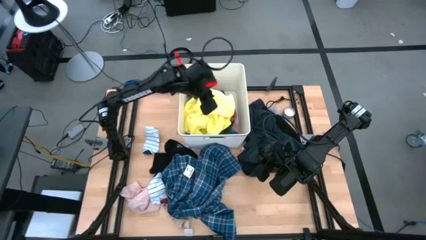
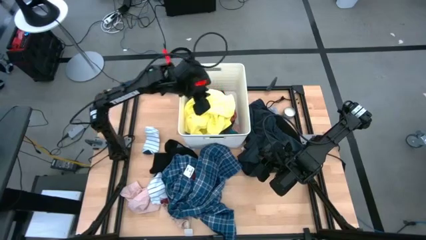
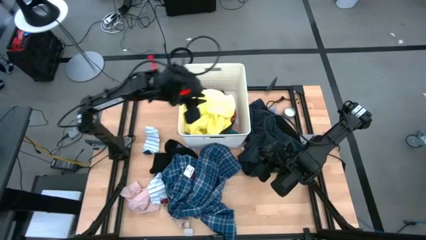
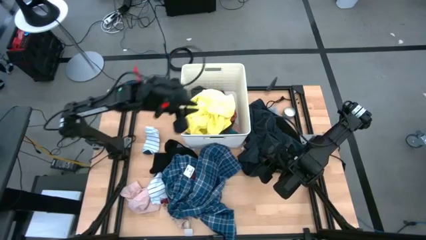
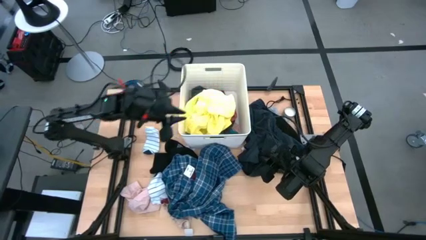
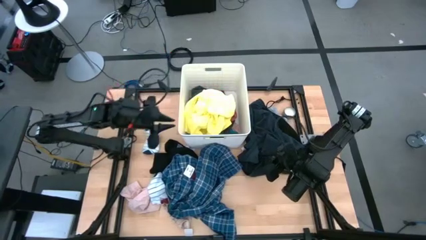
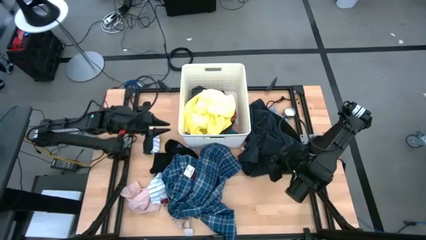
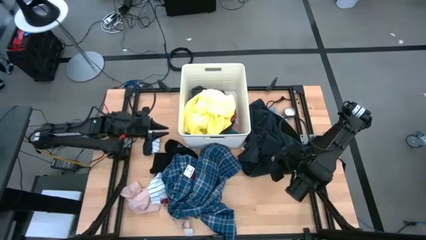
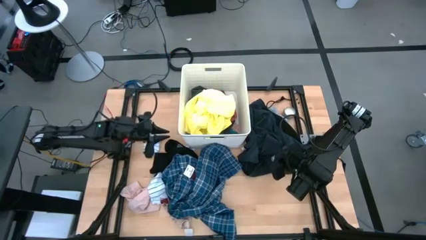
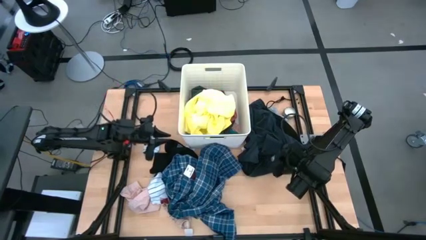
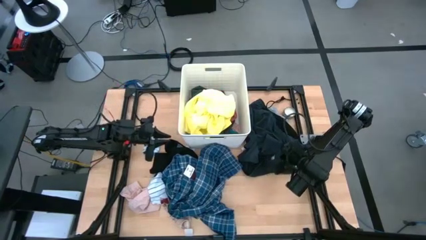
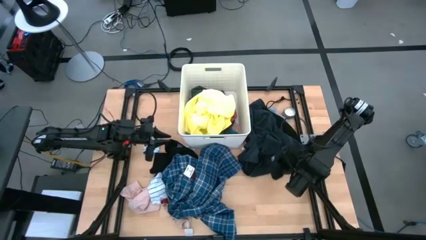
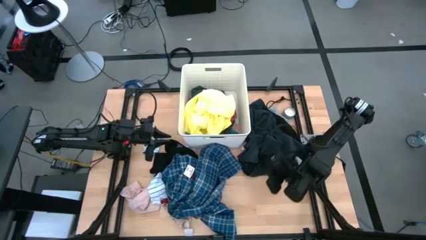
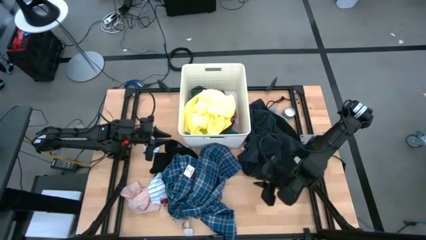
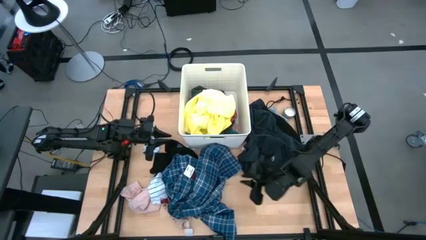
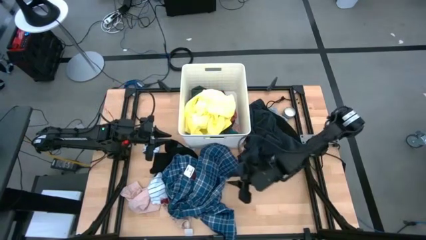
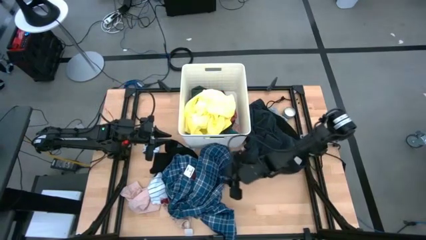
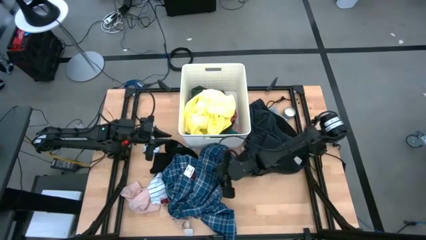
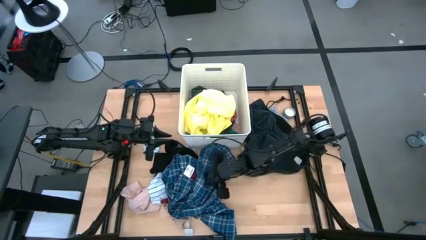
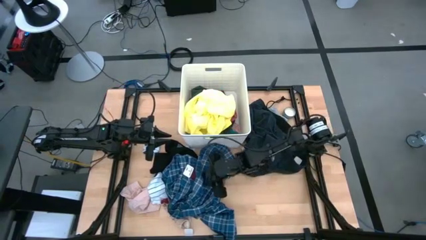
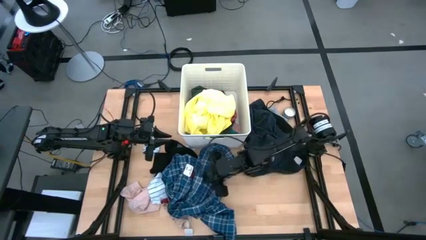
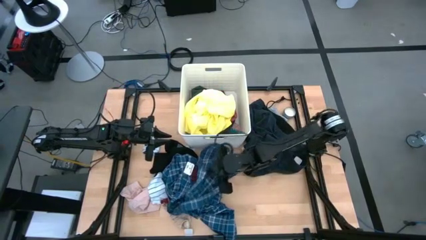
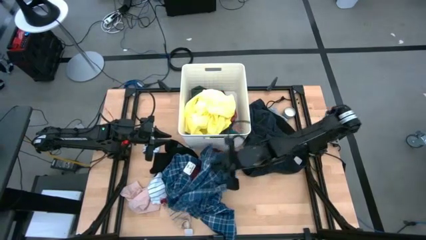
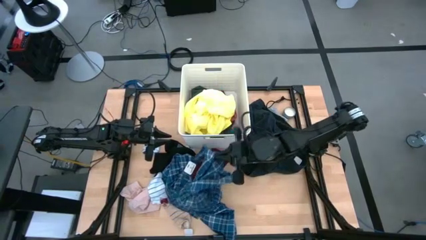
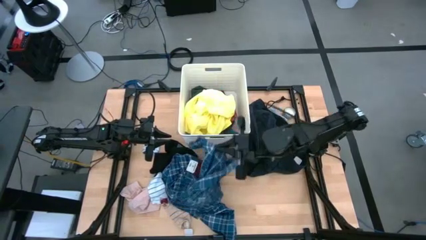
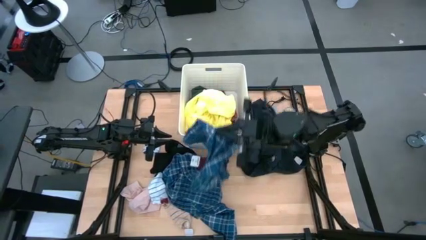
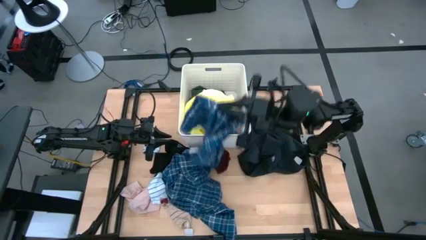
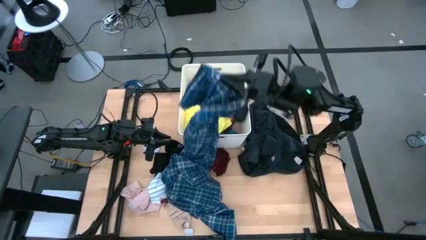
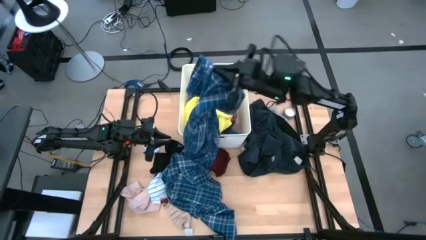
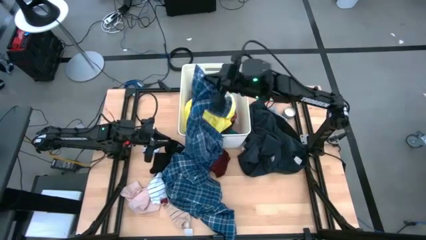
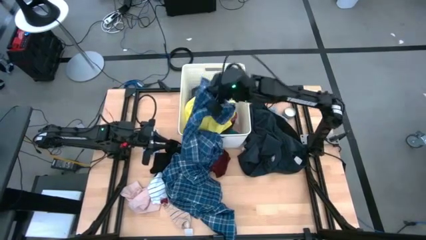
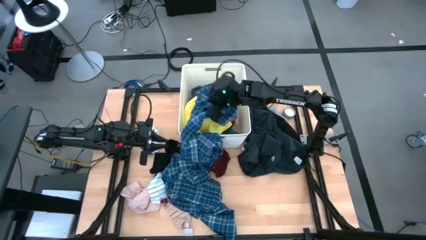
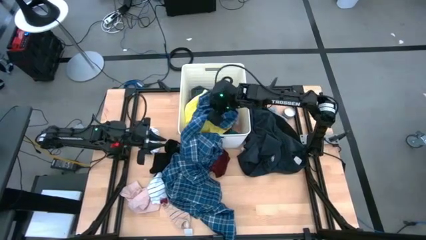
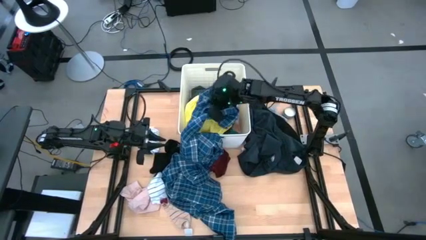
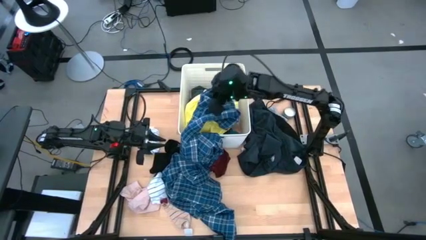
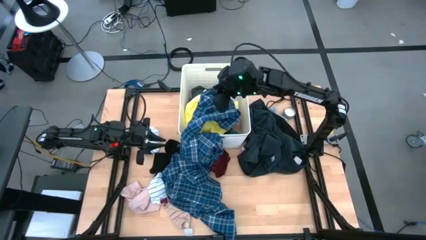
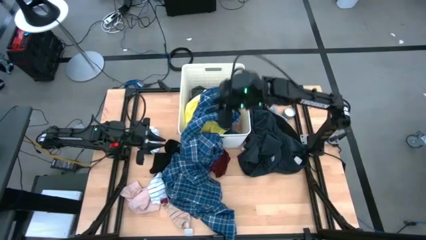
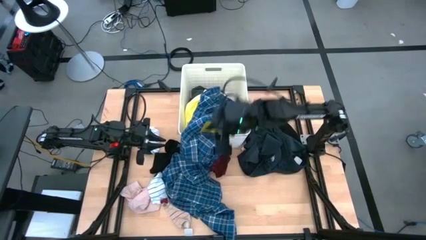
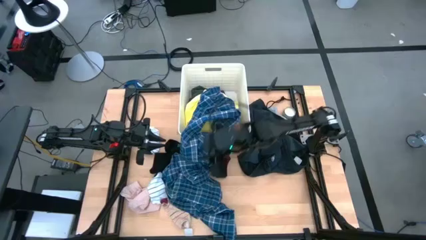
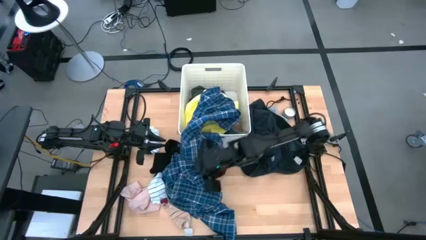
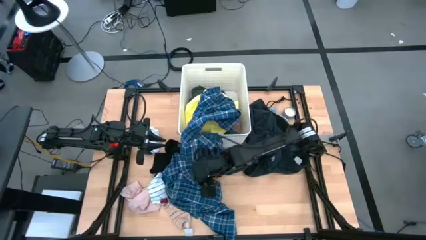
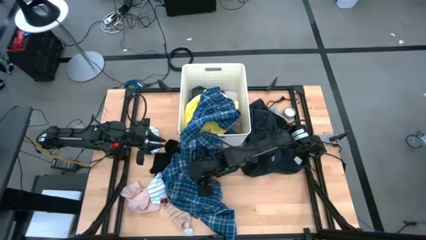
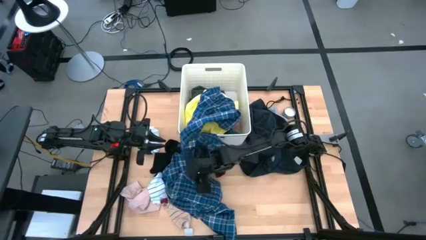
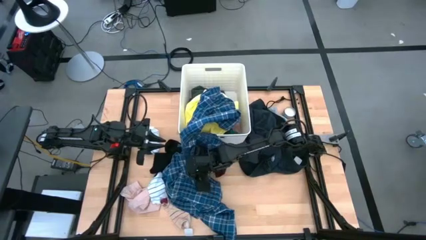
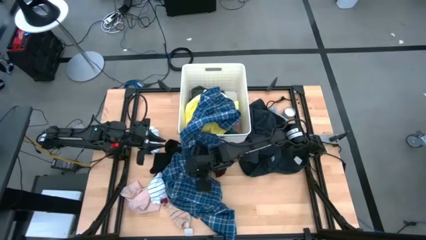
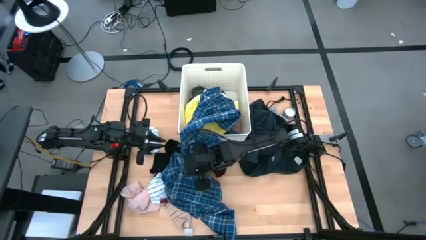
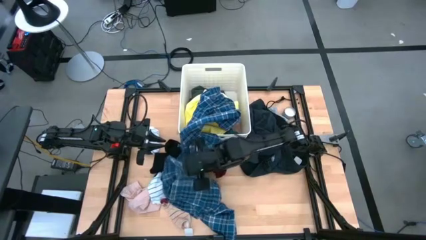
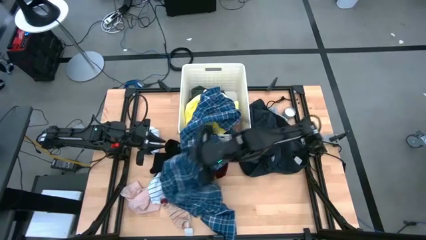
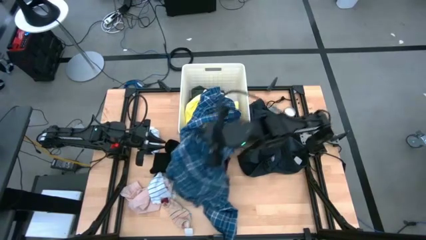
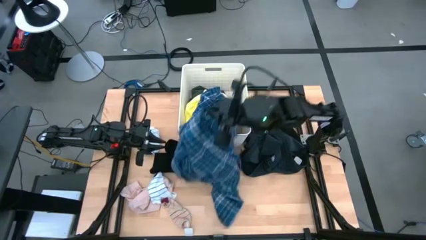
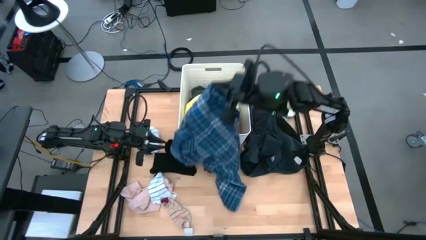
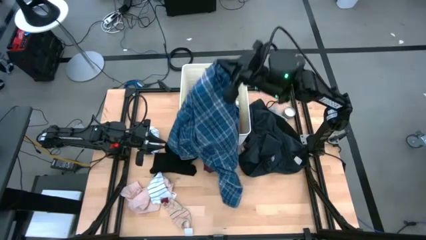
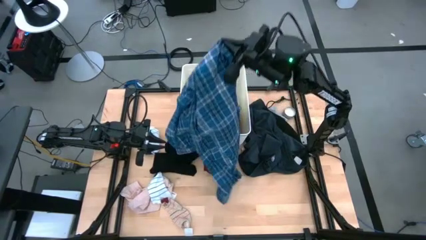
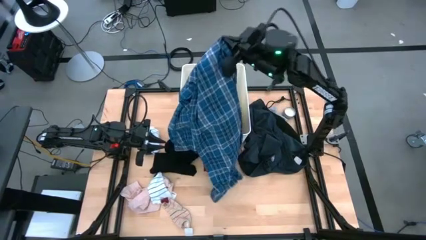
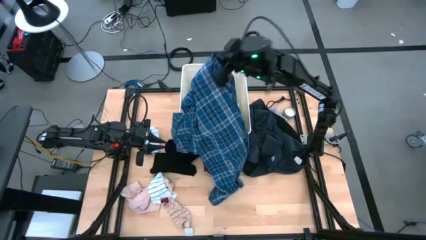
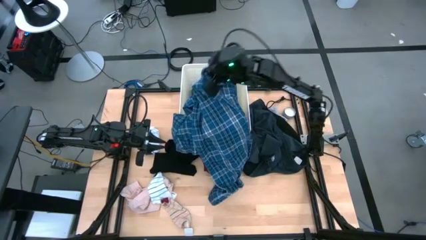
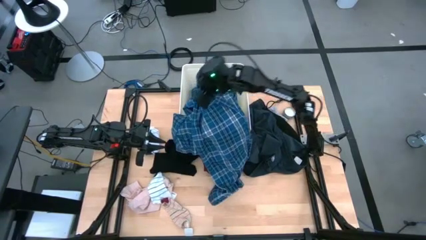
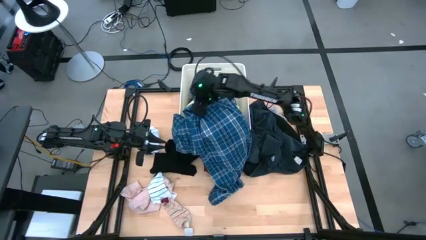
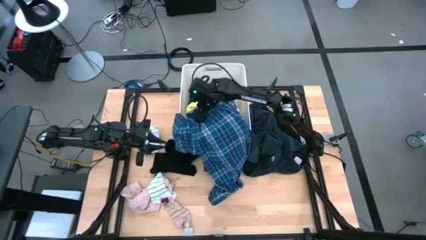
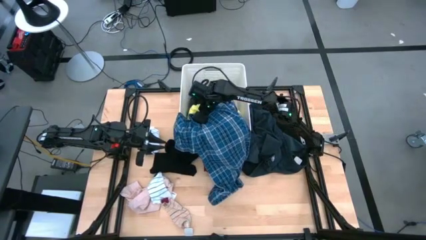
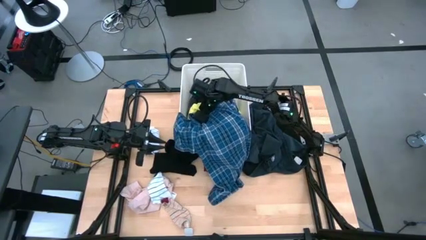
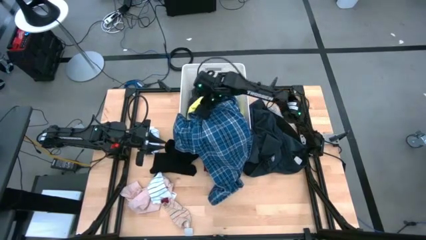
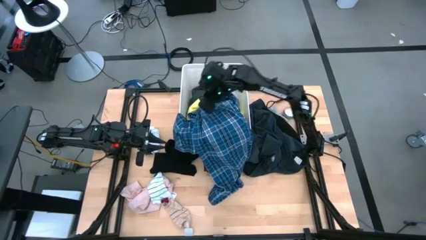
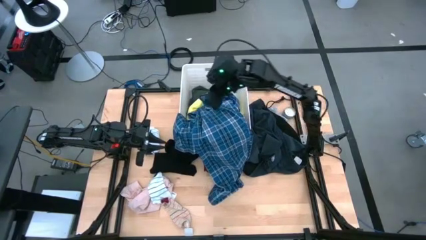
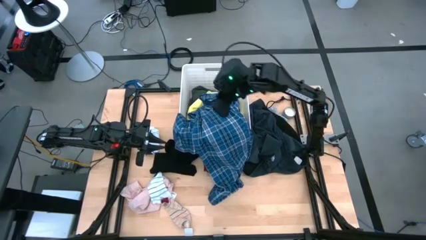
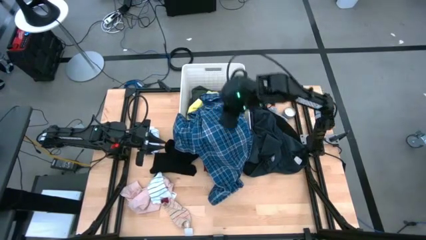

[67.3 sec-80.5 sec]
Task: Sort clothes
Put the blue long pants into the laundry bin
